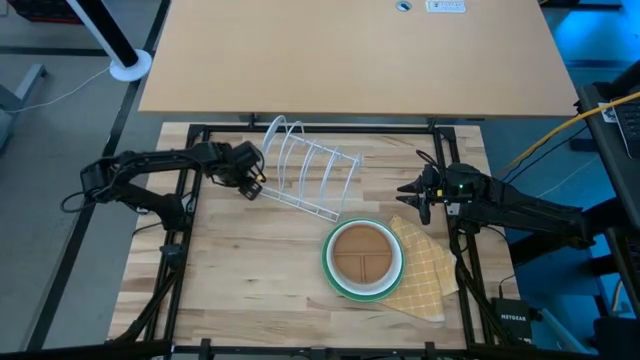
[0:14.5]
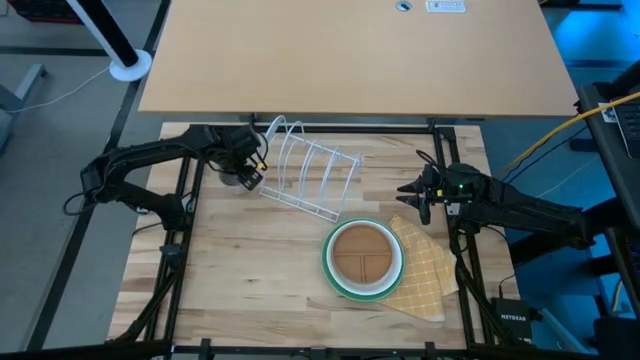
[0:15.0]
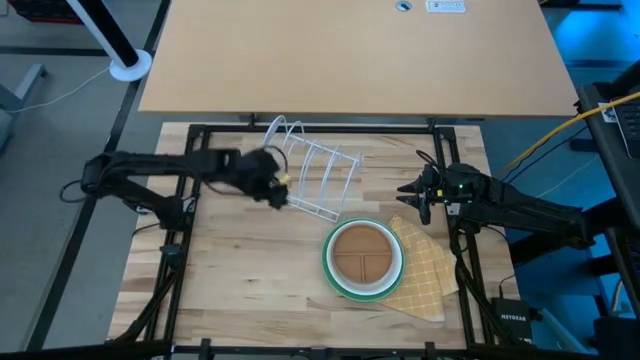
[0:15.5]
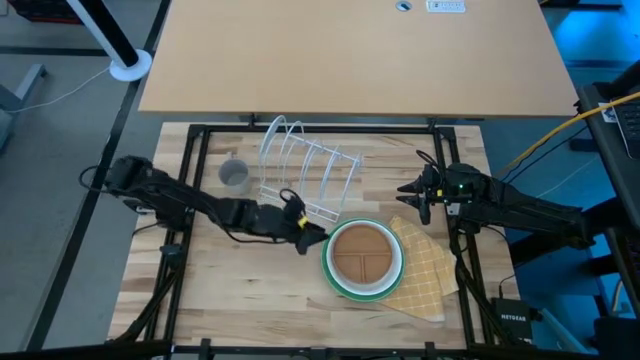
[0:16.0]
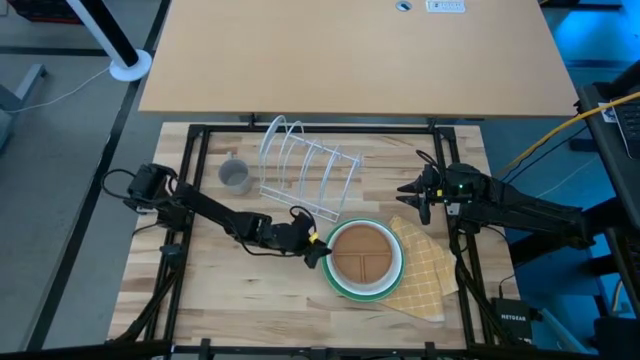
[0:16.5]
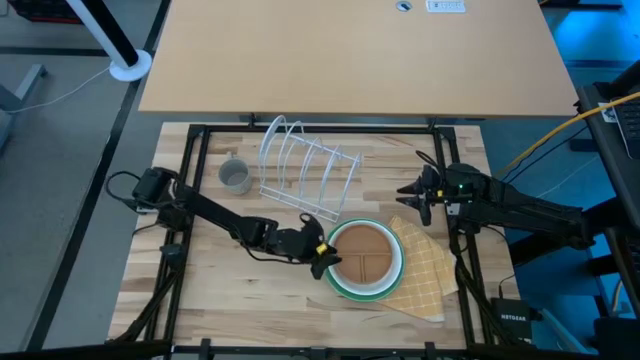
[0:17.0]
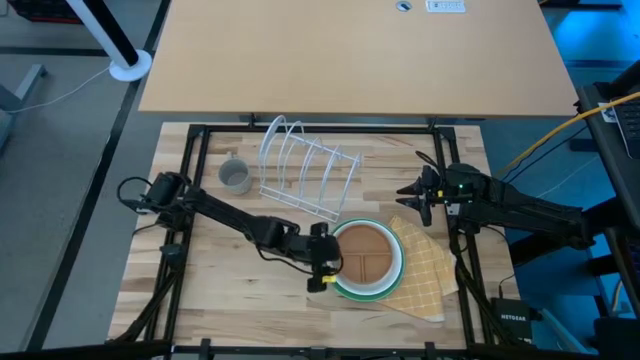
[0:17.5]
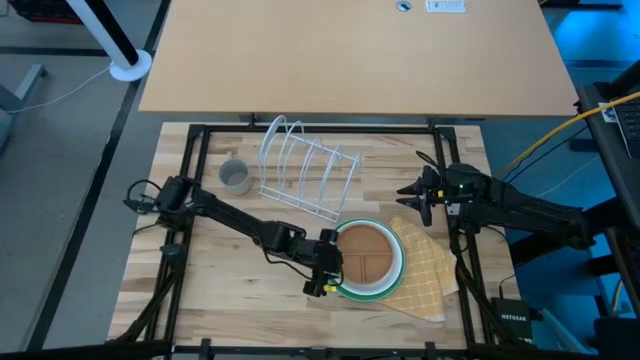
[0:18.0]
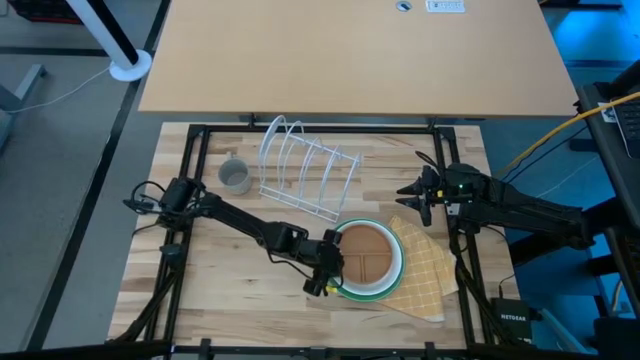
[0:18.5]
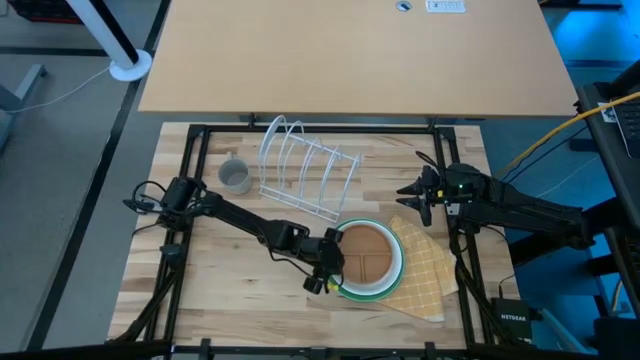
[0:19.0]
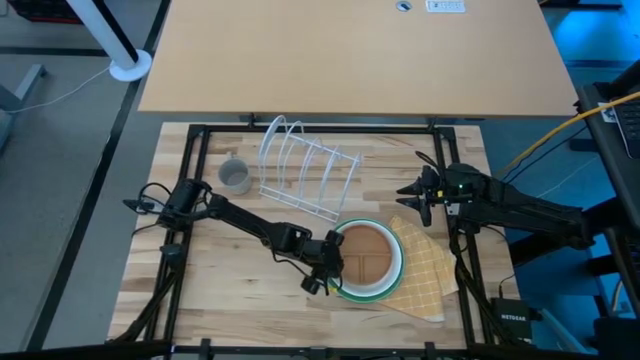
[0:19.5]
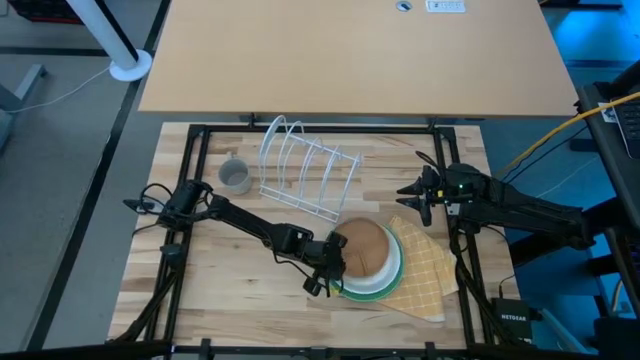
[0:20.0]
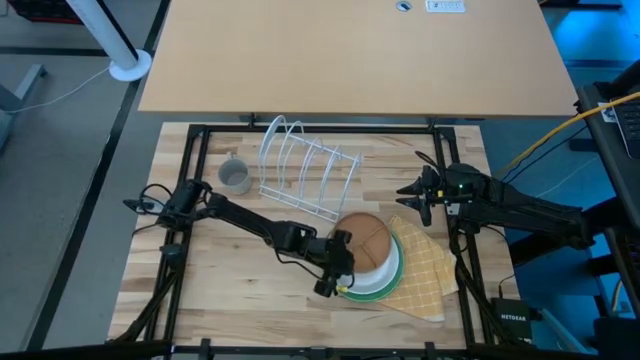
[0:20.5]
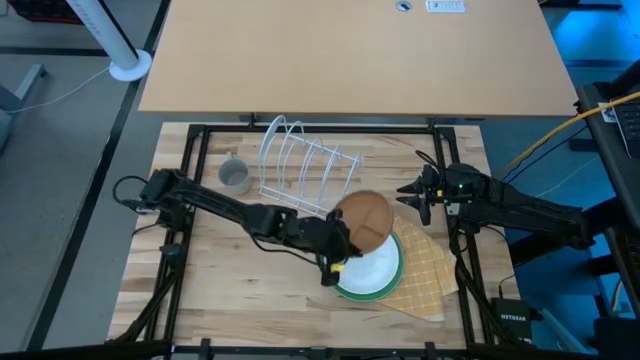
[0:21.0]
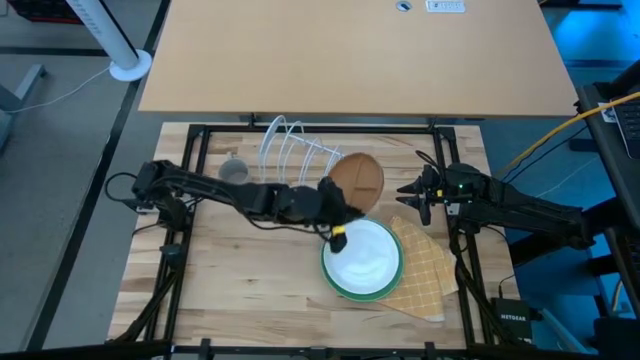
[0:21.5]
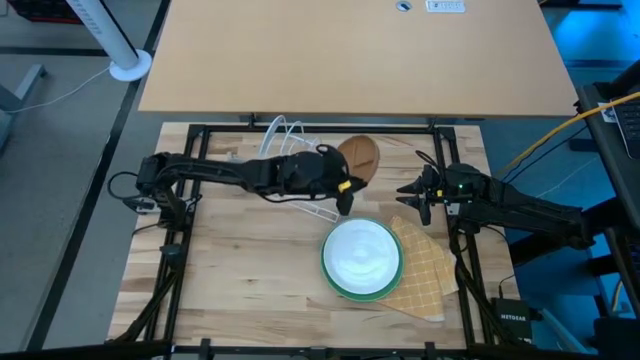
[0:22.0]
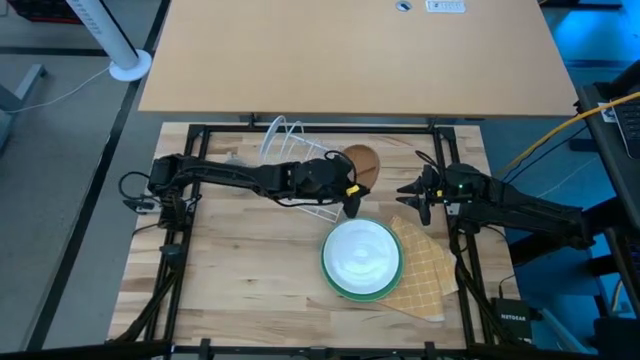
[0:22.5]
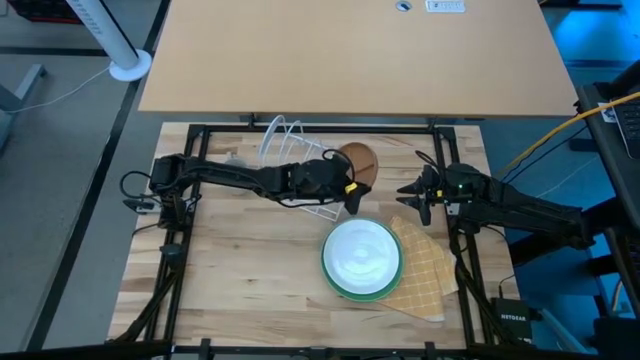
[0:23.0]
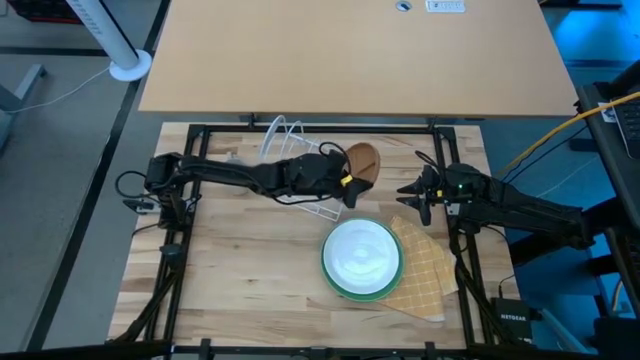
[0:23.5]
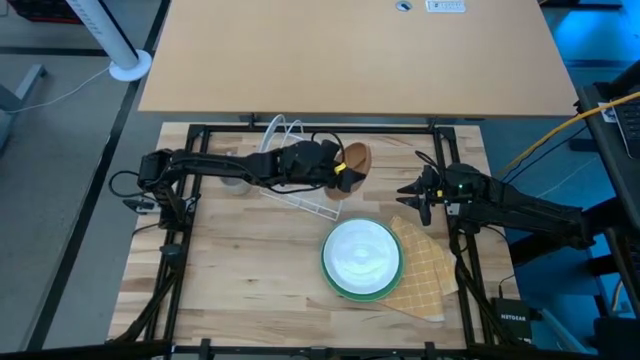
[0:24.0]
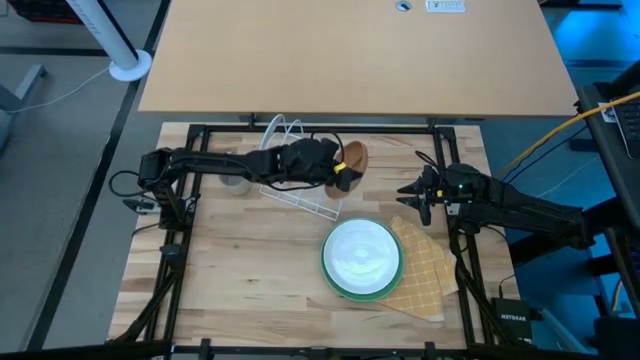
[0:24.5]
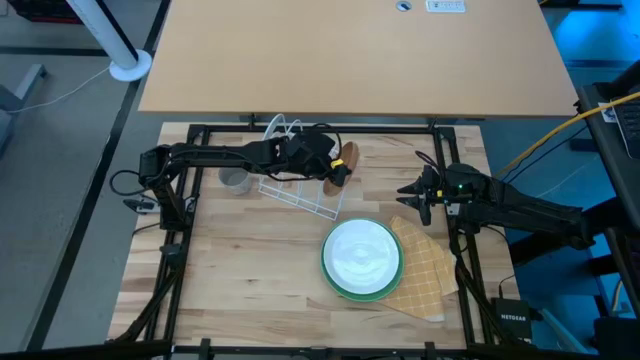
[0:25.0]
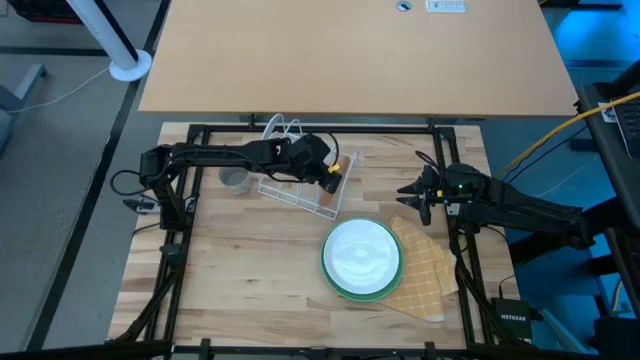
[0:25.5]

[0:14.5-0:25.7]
Task: Sort dishes
Put the brown plate from top of the white plate onto the white dish rack

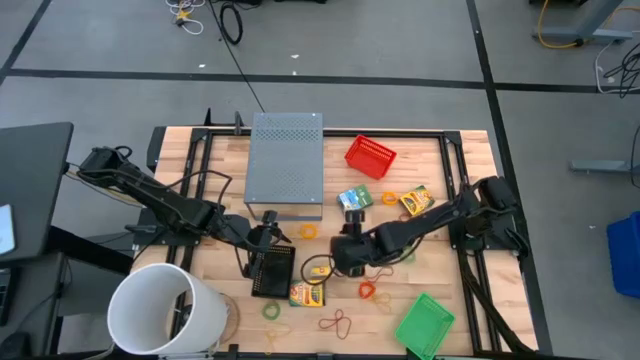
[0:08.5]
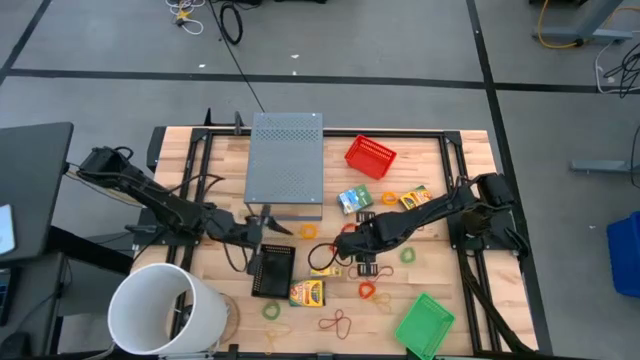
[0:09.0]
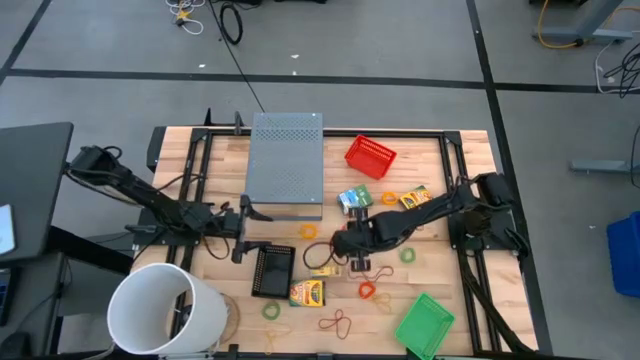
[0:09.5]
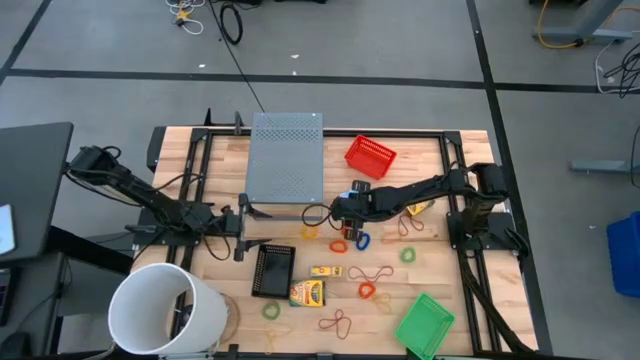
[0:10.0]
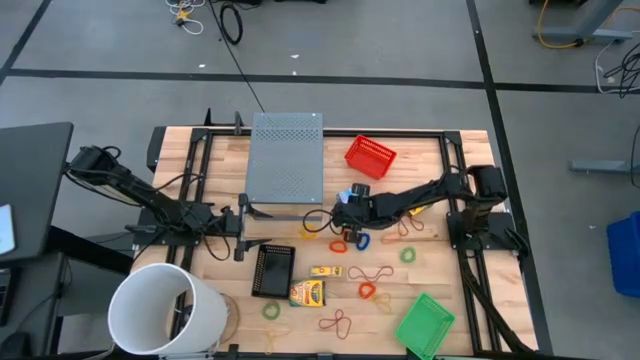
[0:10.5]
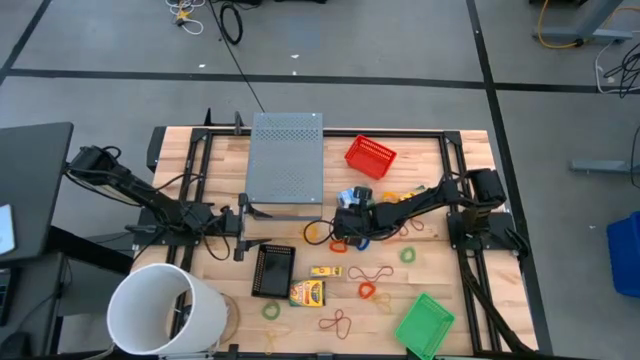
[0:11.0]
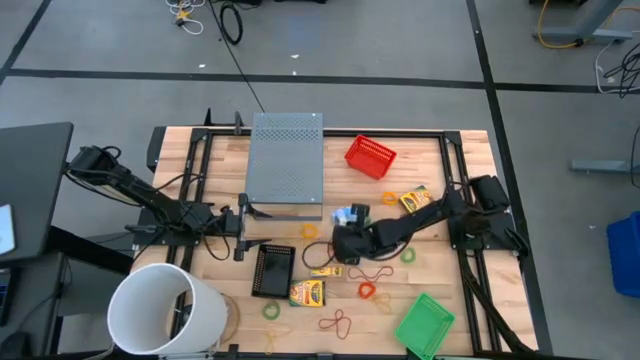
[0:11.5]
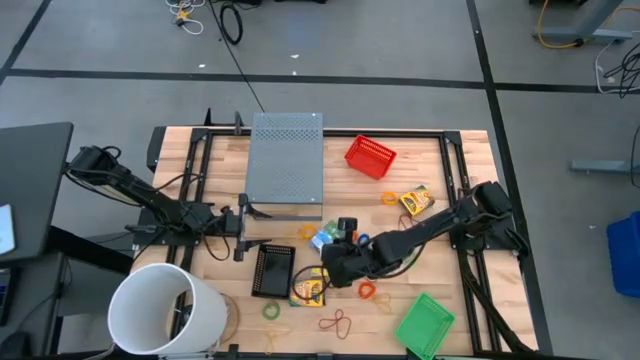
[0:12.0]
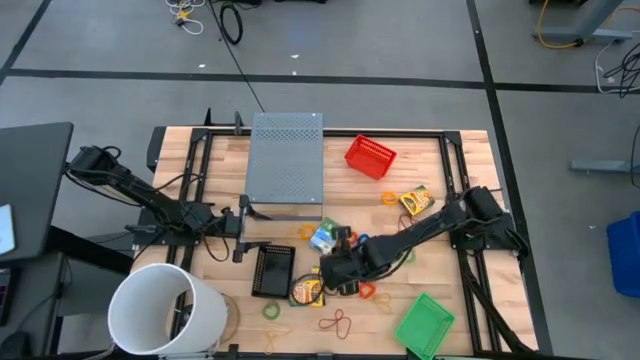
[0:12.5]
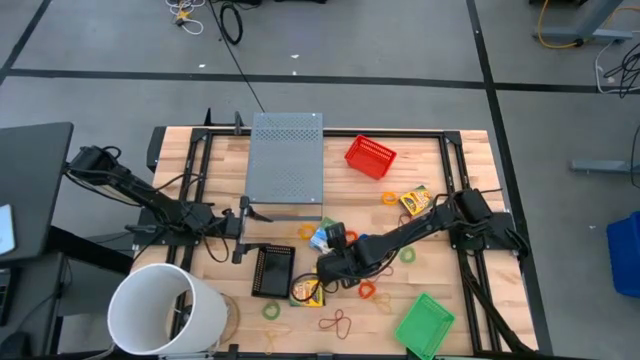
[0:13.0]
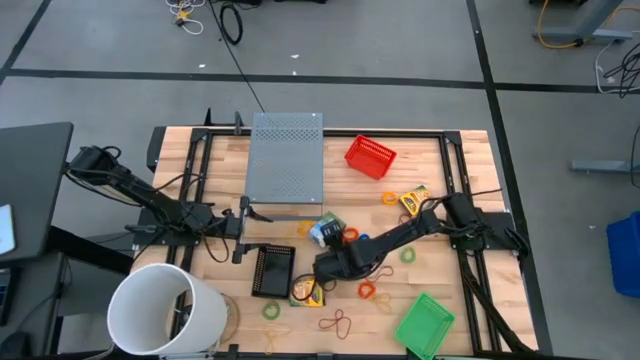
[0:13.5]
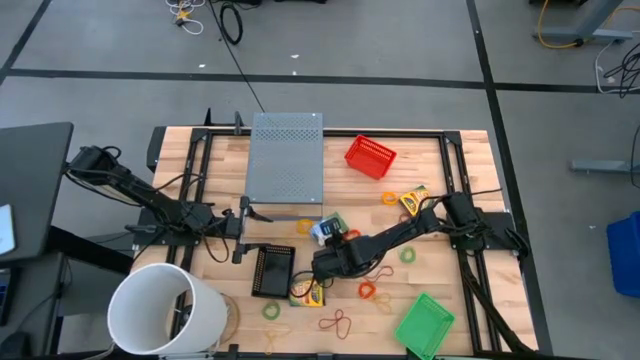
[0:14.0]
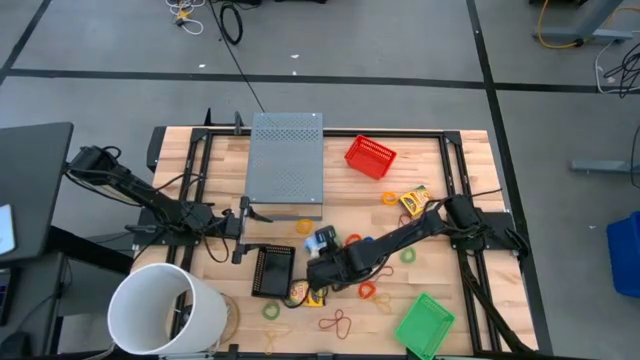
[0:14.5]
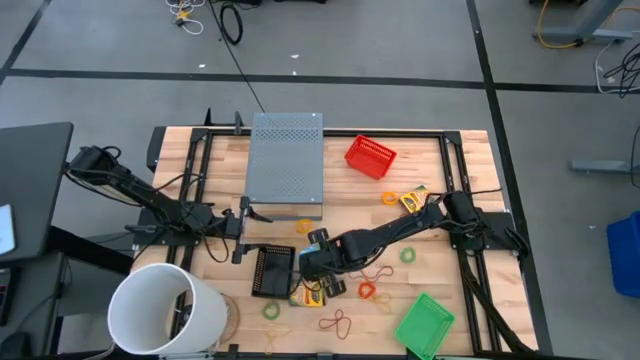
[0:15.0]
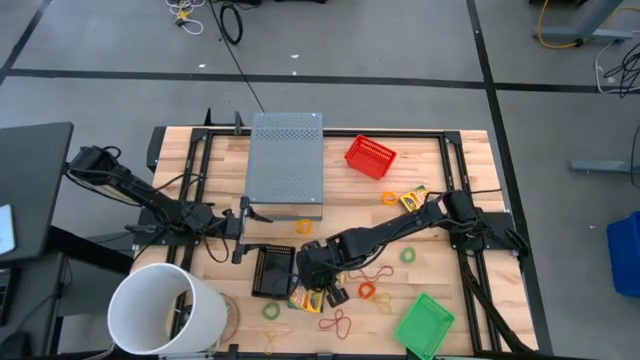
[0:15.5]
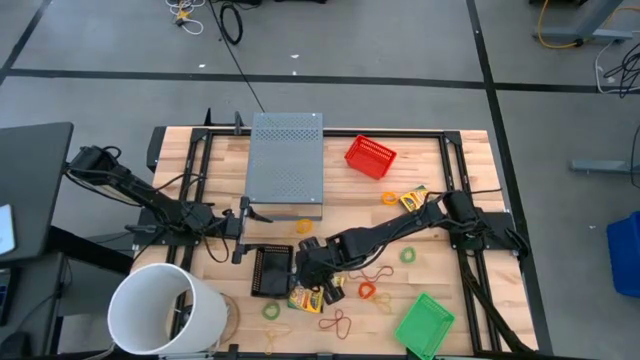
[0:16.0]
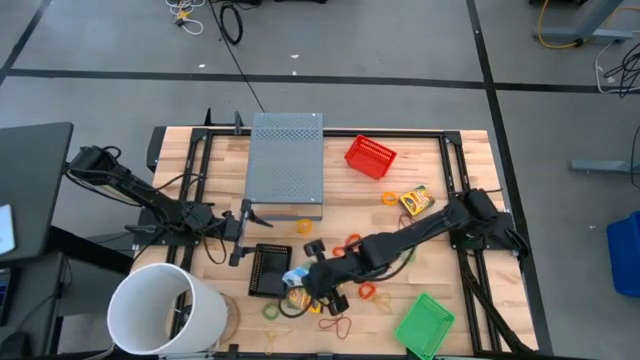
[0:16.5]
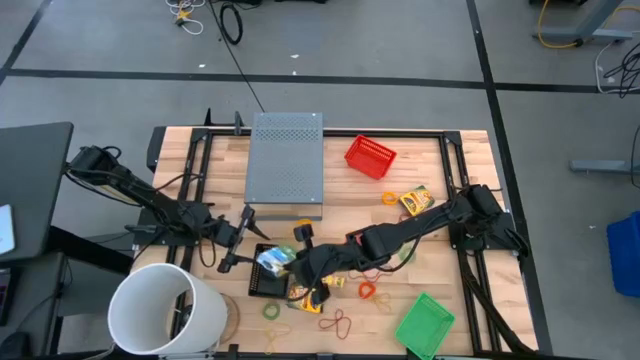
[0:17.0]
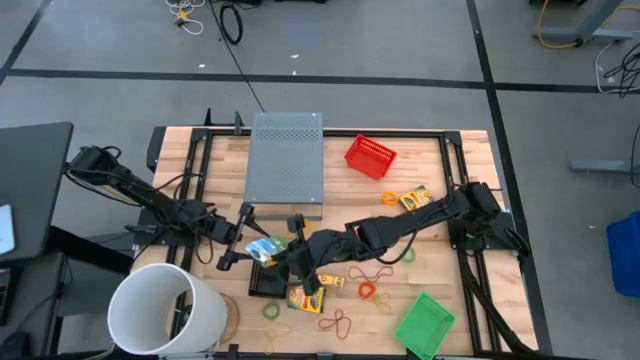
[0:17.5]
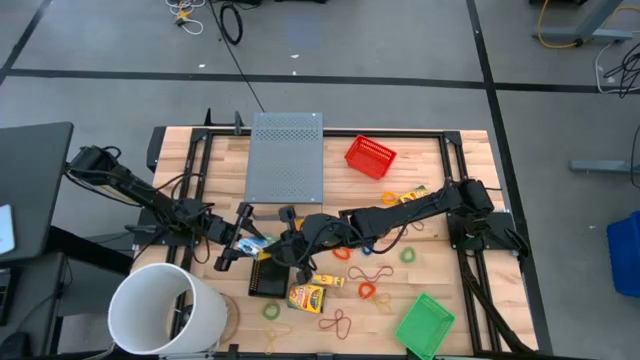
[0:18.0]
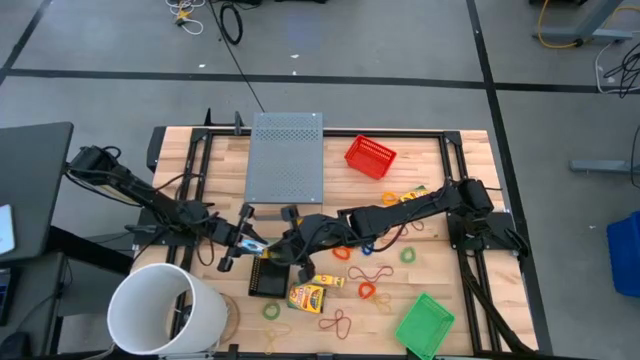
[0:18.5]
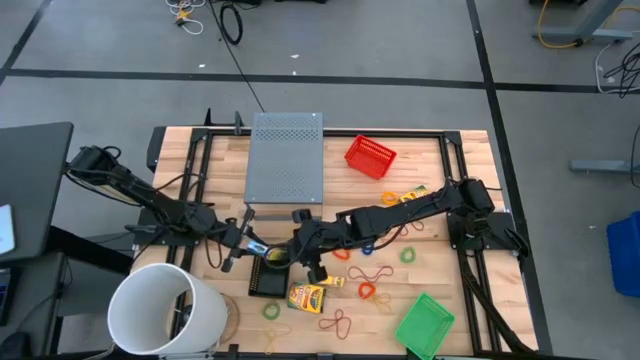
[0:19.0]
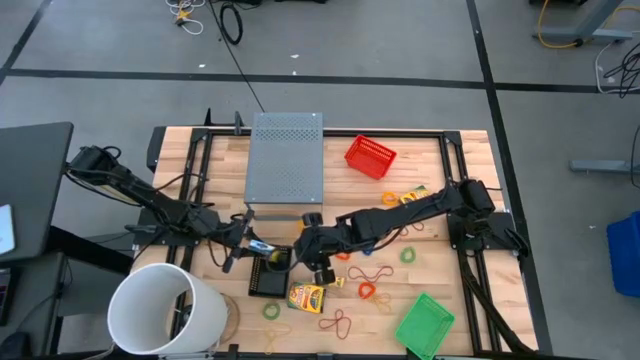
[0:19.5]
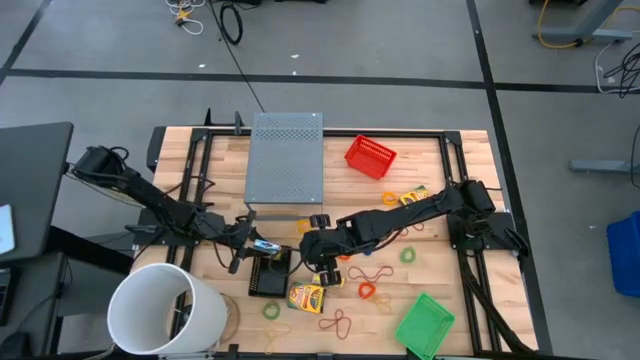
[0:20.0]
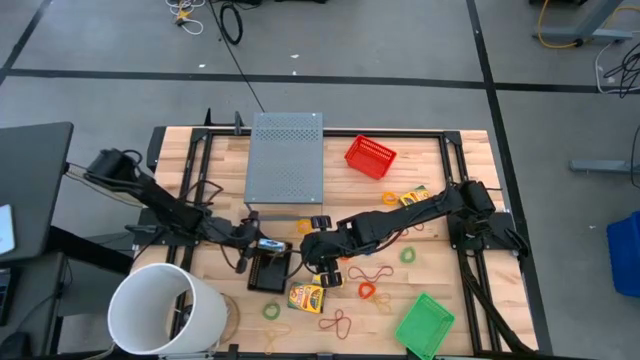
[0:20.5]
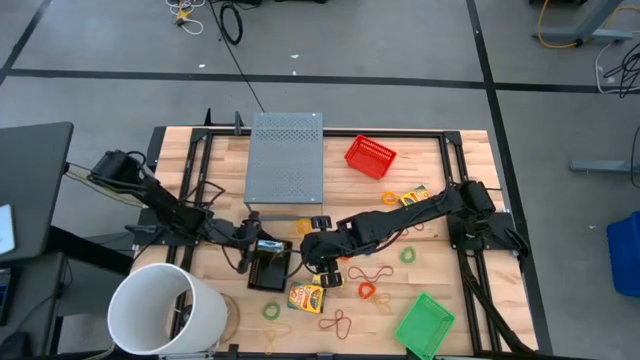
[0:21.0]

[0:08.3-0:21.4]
Task: Pick & Place Office Desk Supplies
Put the top left crayon box into the black basket
